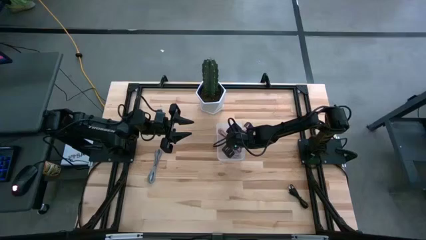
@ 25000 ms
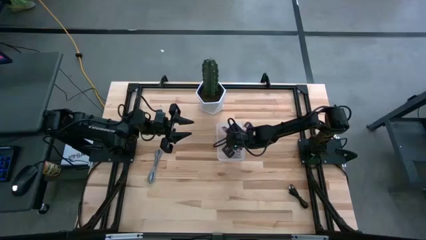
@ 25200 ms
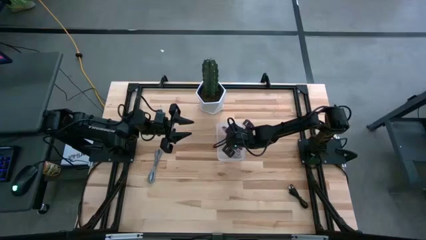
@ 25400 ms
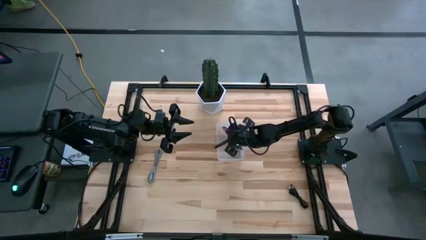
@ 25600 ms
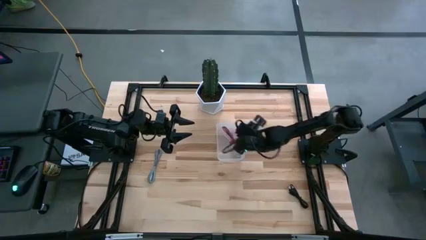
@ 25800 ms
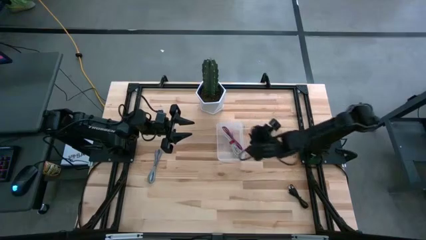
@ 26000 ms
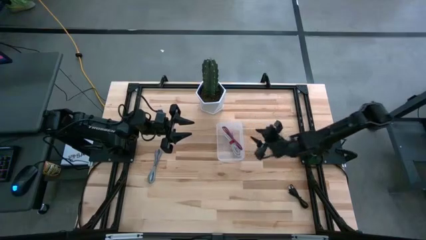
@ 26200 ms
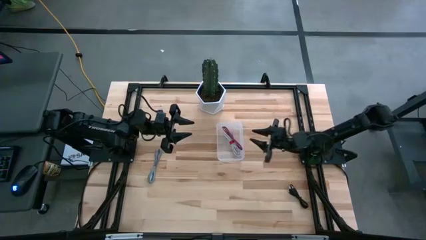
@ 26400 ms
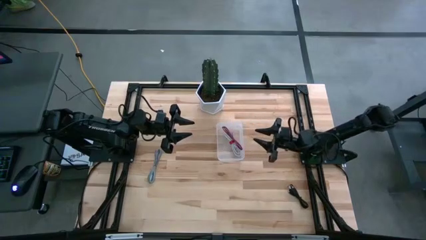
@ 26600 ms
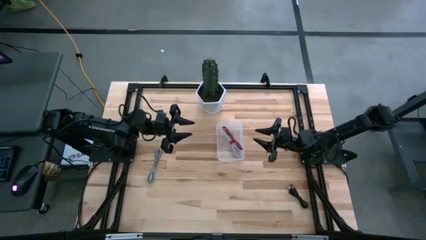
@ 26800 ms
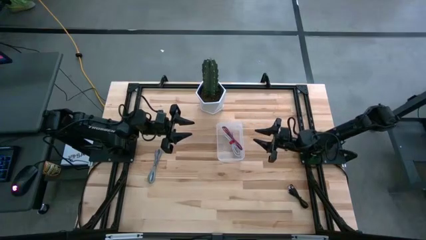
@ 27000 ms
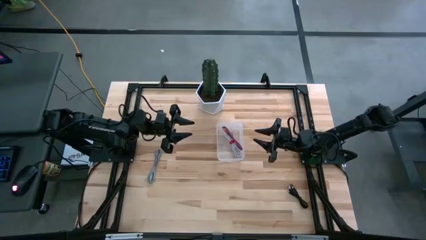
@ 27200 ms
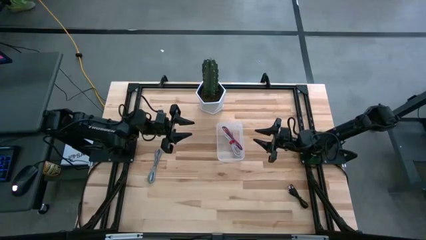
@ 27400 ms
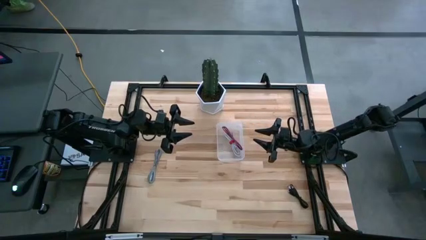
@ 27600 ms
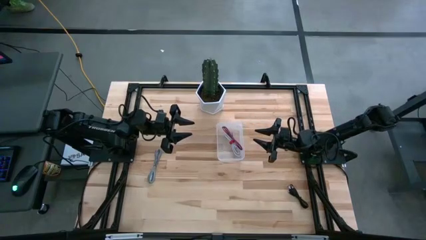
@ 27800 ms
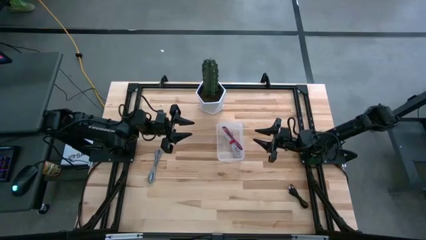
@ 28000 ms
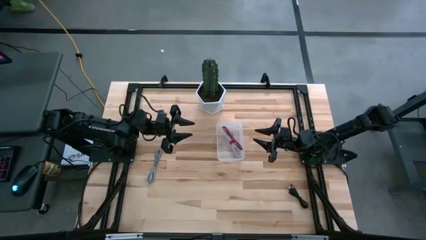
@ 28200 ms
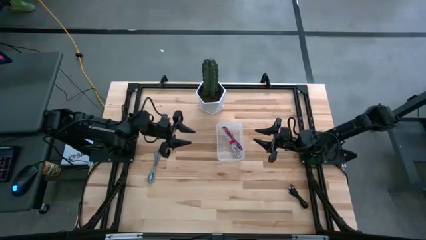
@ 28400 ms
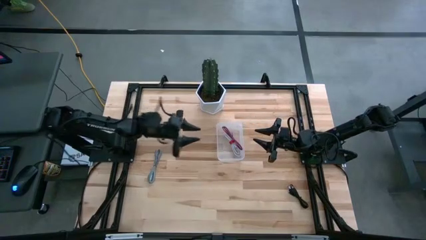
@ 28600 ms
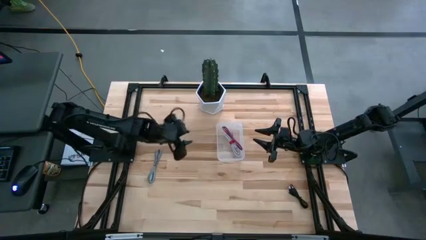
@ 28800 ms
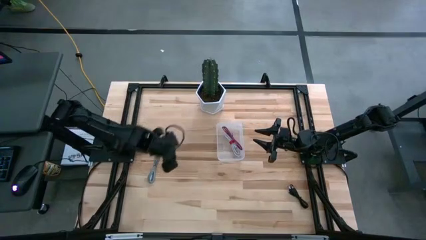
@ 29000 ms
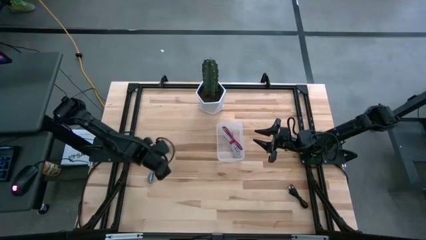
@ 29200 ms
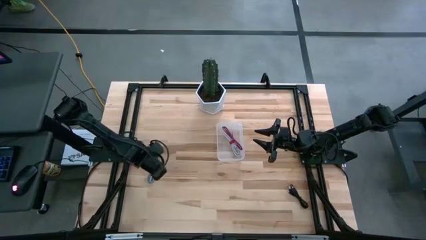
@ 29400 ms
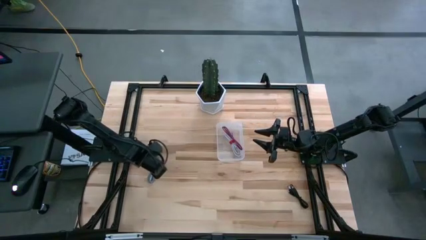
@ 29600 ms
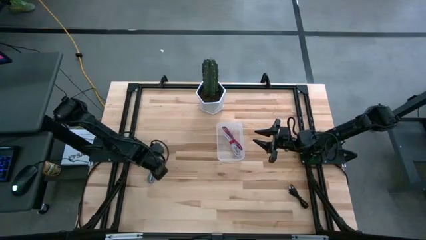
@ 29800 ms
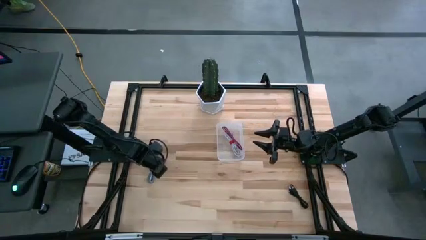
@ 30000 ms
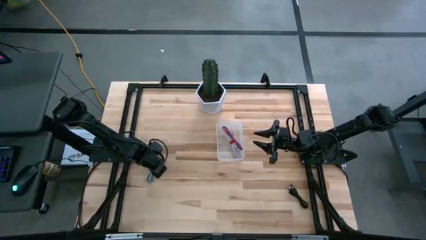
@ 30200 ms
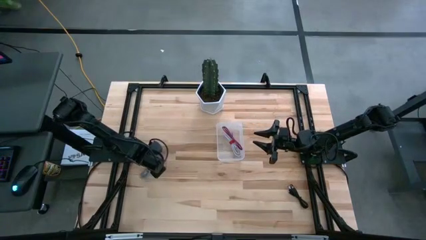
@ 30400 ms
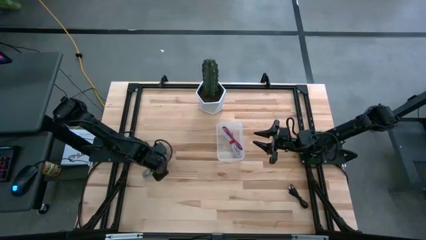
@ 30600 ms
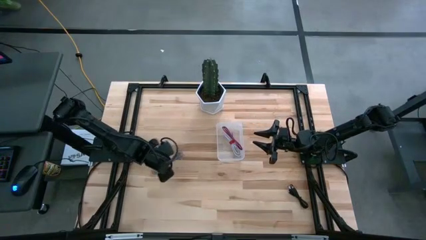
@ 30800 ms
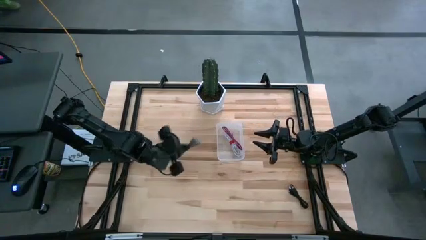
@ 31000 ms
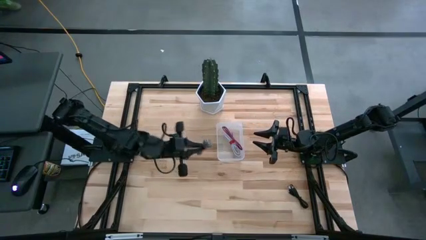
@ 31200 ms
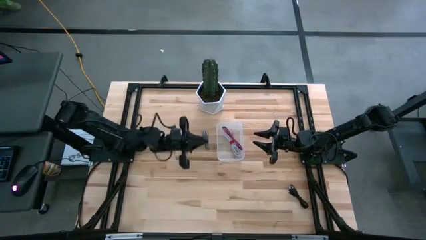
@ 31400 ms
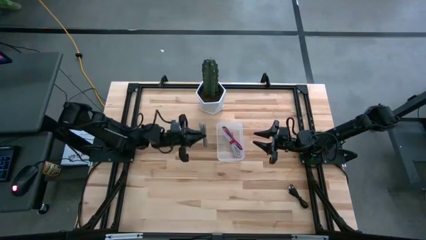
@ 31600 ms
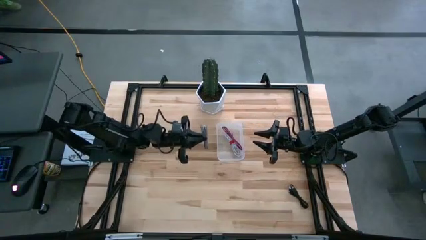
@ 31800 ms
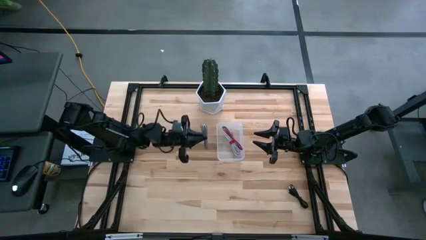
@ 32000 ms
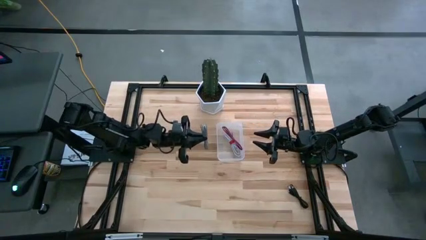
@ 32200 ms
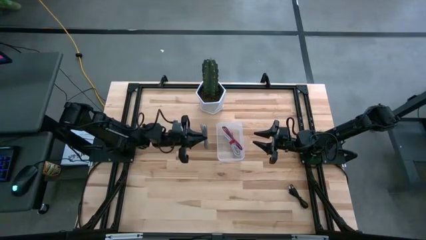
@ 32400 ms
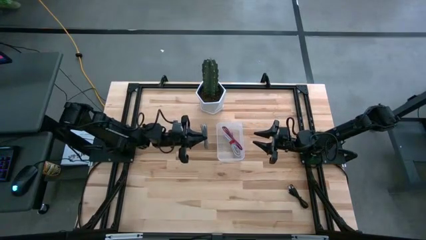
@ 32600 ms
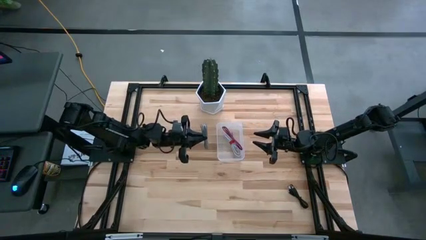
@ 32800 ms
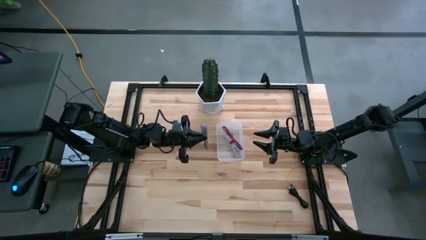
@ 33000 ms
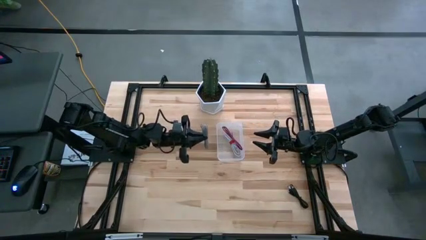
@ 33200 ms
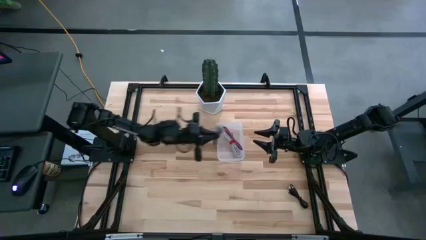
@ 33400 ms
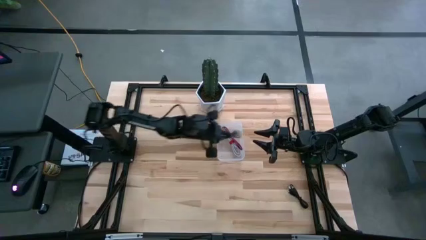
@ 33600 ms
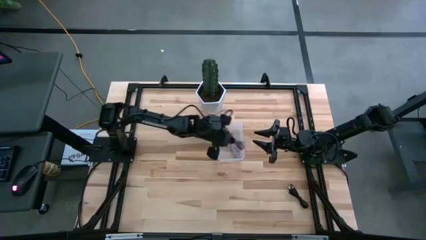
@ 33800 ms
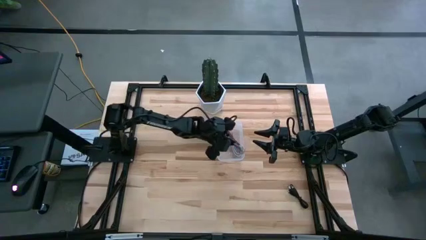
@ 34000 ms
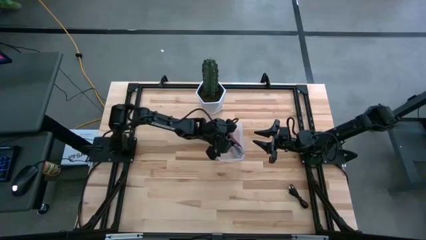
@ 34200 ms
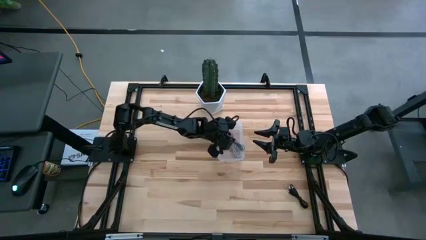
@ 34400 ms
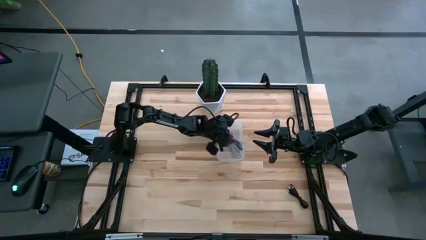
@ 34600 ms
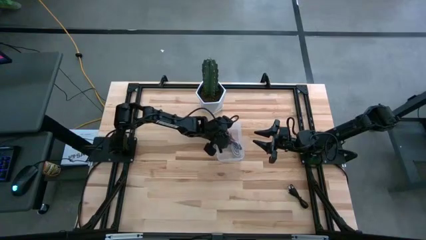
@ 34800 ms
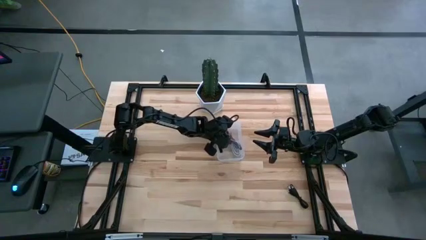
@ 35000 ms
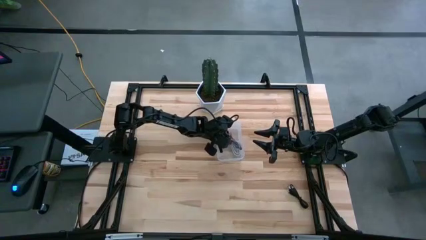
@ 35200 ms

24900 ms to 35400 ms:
Task: Pick and place USB-C Cables
Put the white black charger cable into the transparent bin
